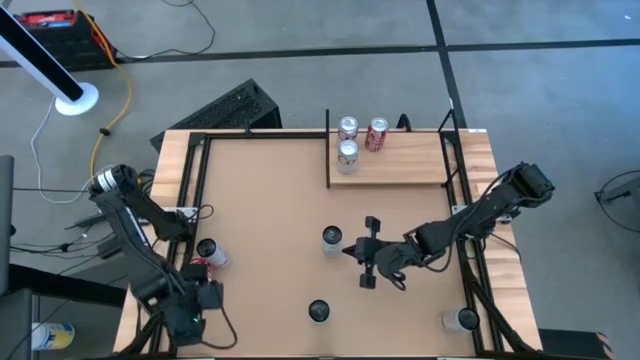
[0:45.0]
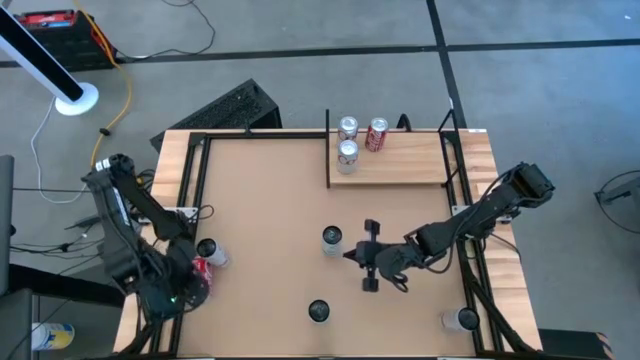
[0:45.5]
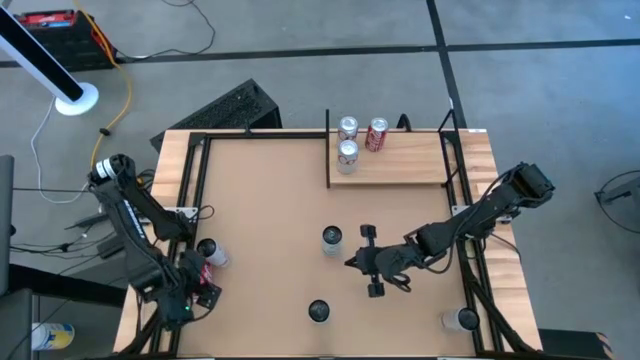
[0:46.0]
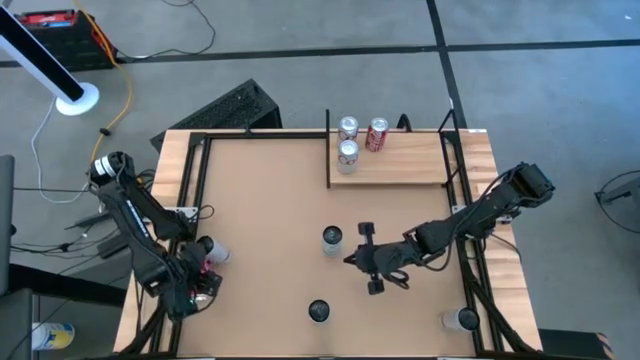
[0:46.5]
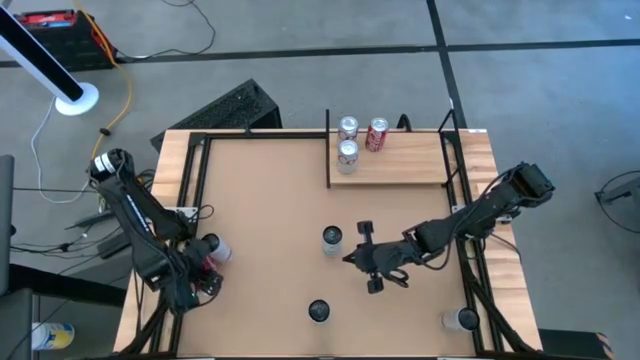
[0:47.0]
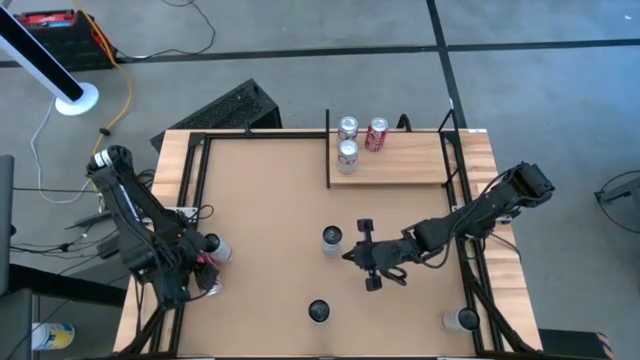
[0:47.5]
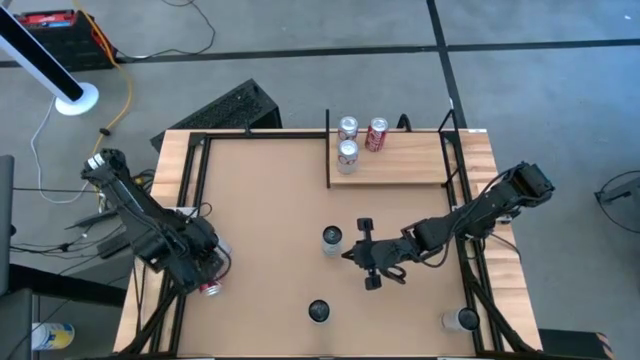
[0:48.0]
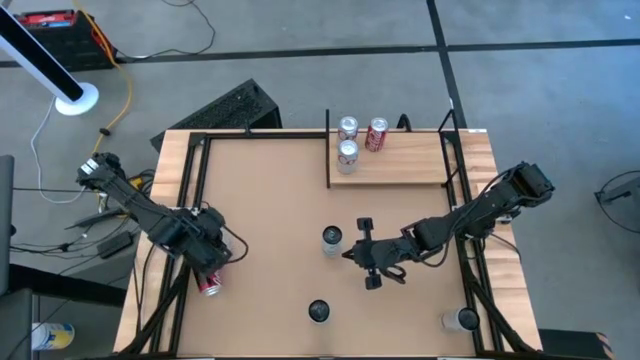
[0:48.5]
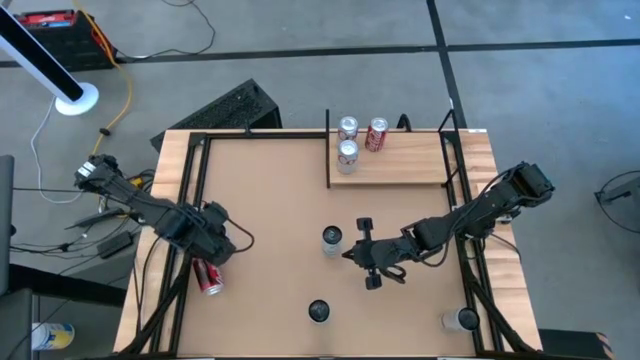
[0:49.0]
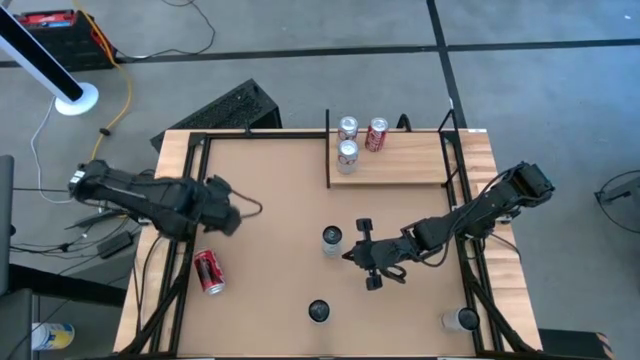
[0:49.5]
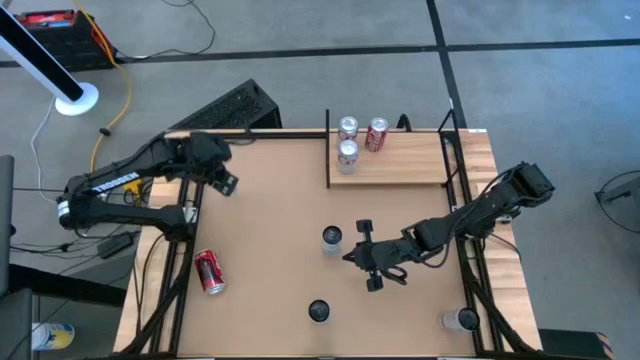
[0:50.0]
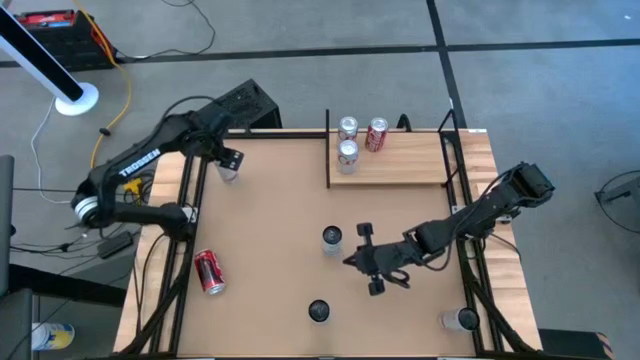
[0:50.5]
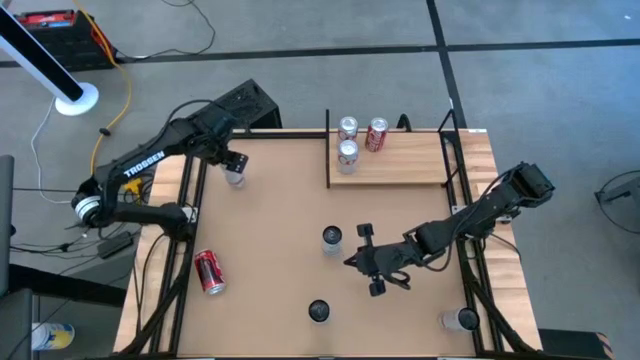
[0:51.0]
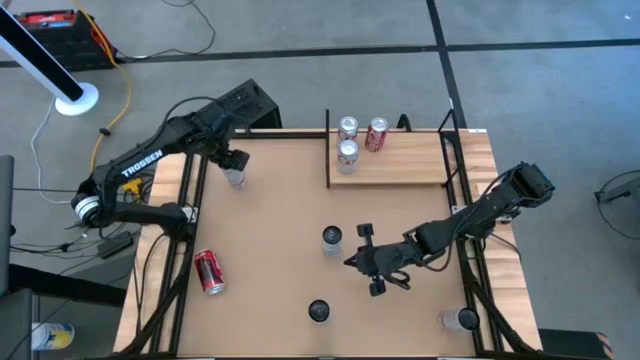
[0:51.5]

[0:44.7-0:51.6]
Task: Place canned beverage on shelf
Move the white-pink soda can to the top left of the table

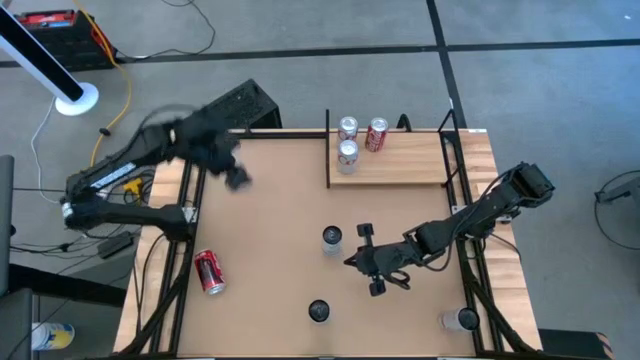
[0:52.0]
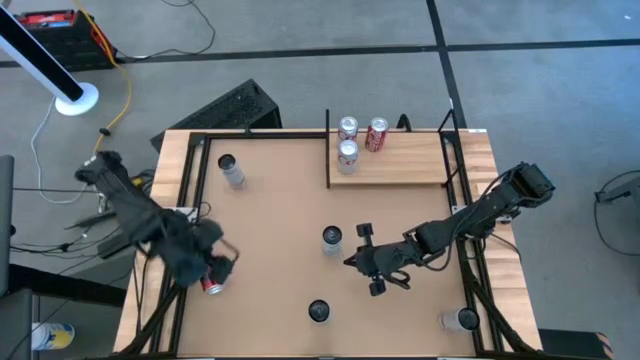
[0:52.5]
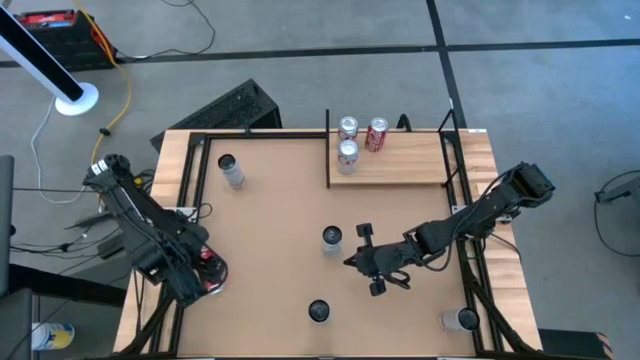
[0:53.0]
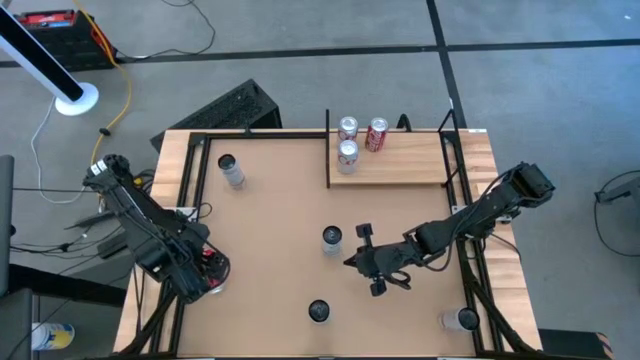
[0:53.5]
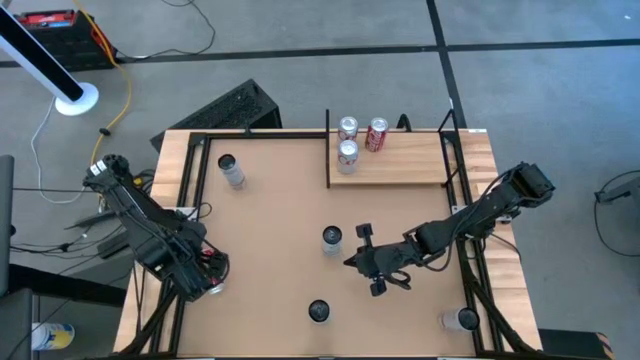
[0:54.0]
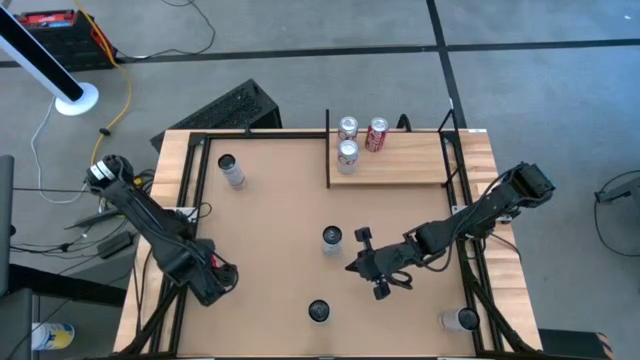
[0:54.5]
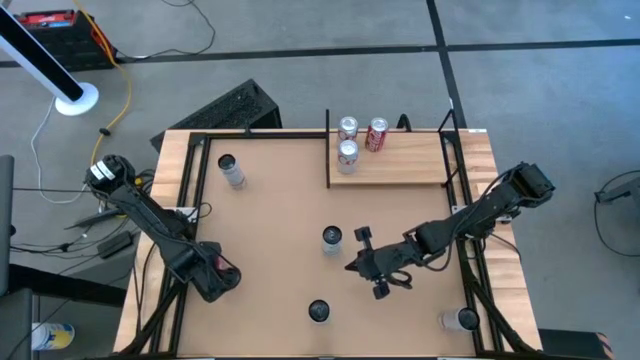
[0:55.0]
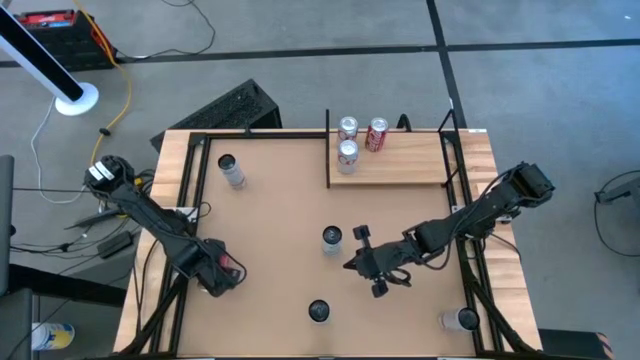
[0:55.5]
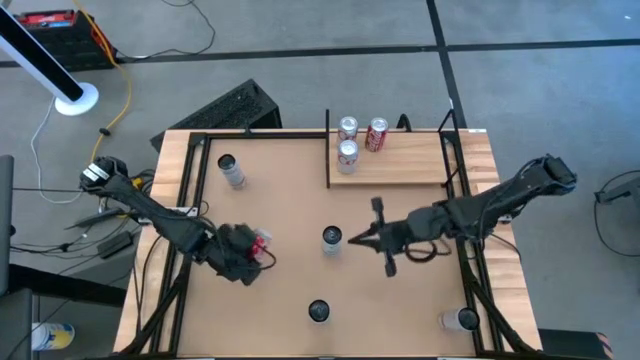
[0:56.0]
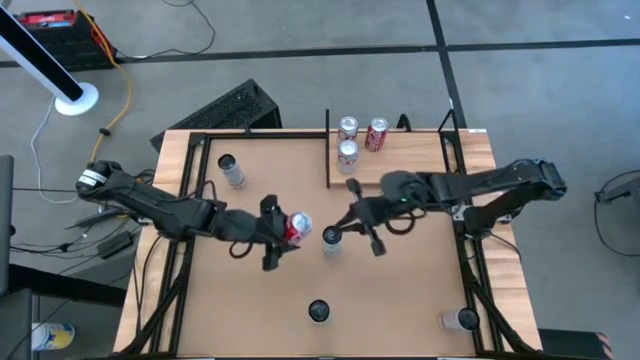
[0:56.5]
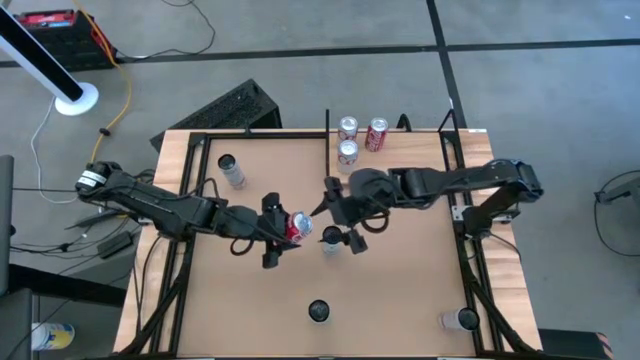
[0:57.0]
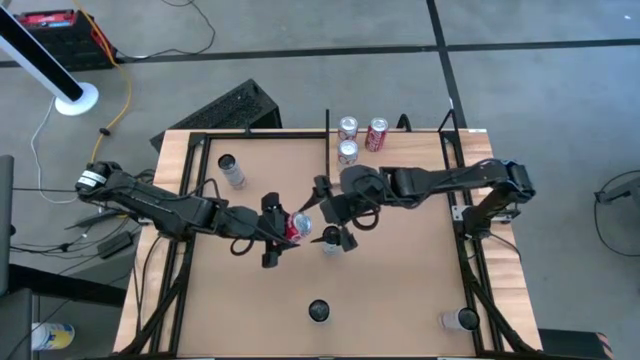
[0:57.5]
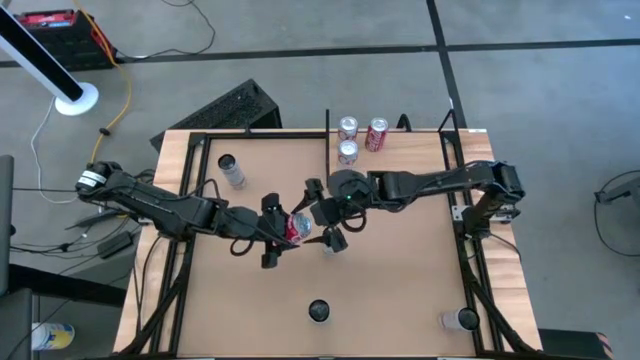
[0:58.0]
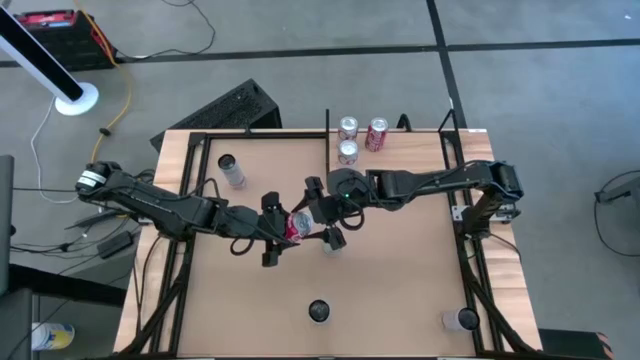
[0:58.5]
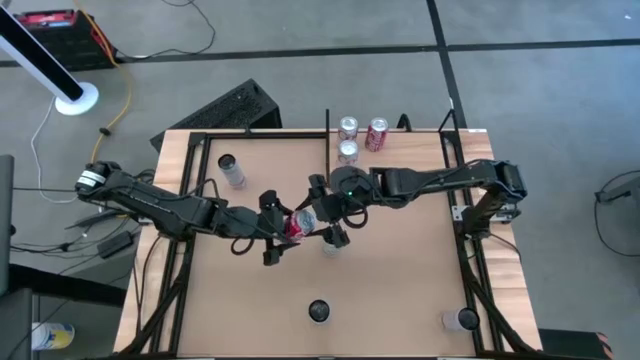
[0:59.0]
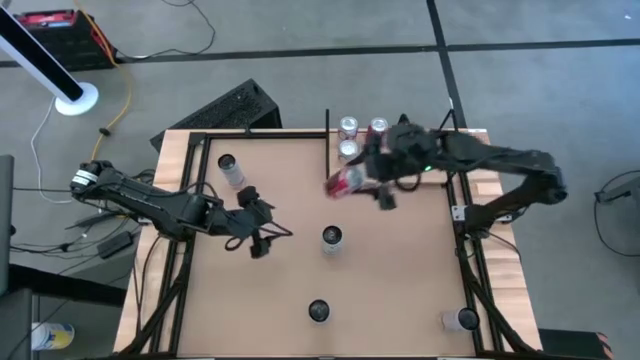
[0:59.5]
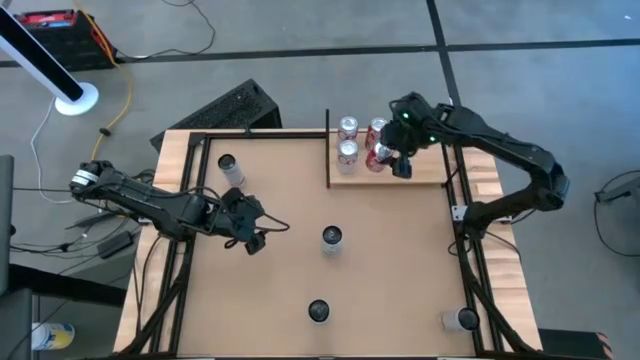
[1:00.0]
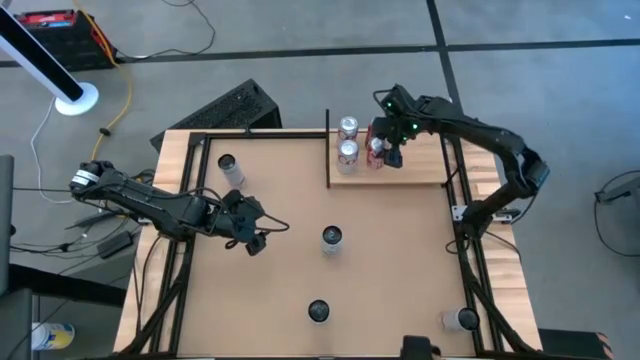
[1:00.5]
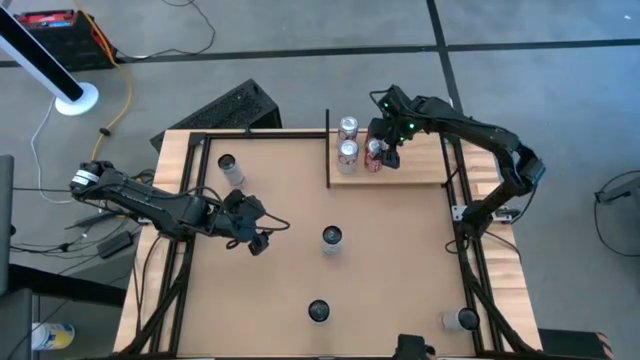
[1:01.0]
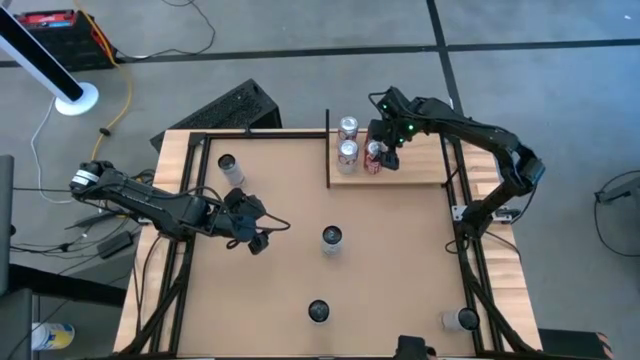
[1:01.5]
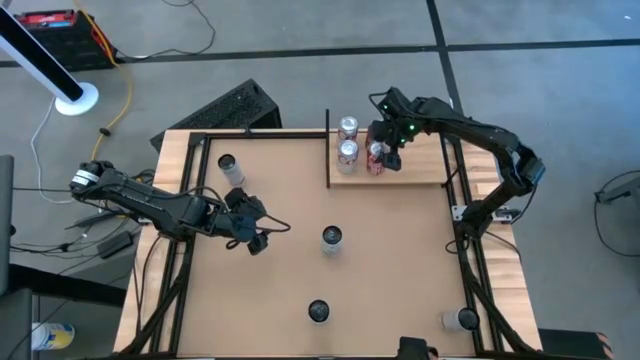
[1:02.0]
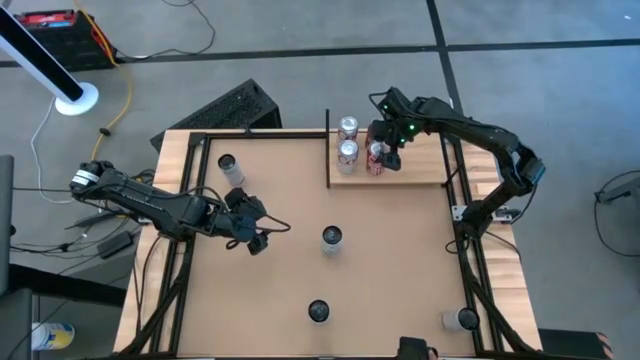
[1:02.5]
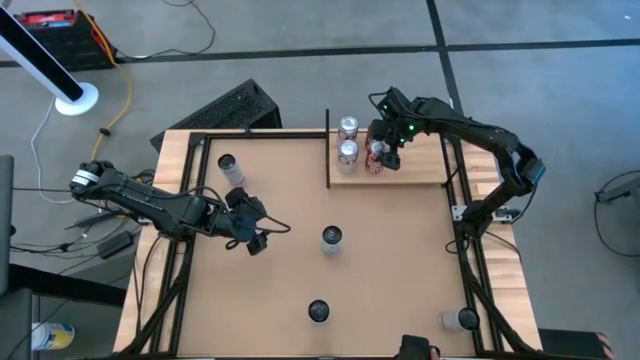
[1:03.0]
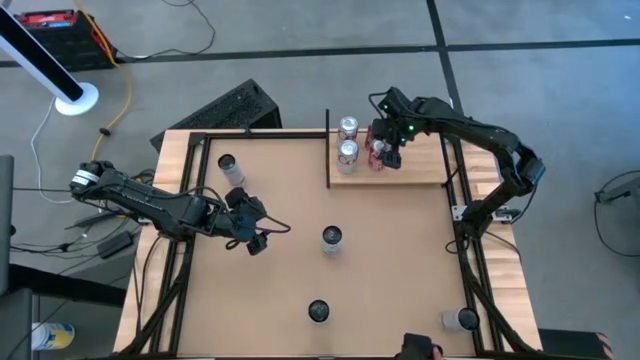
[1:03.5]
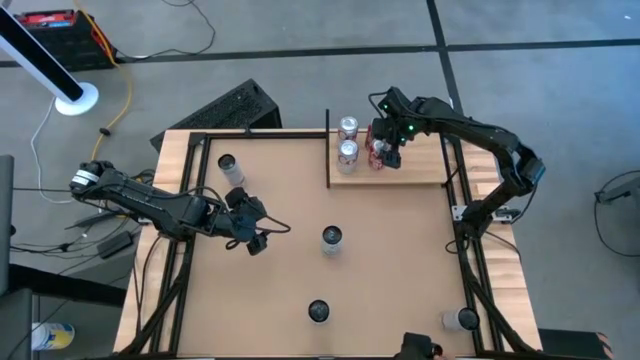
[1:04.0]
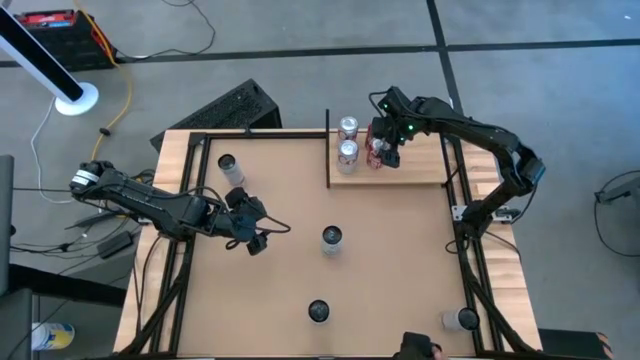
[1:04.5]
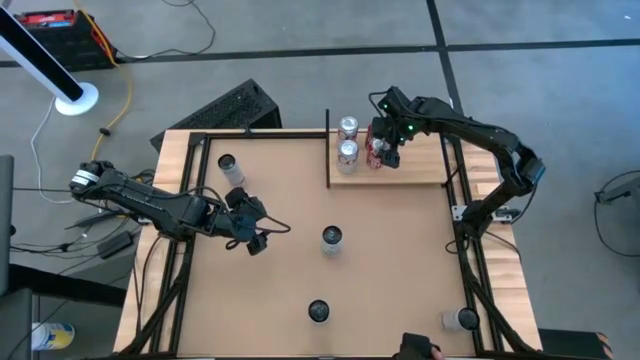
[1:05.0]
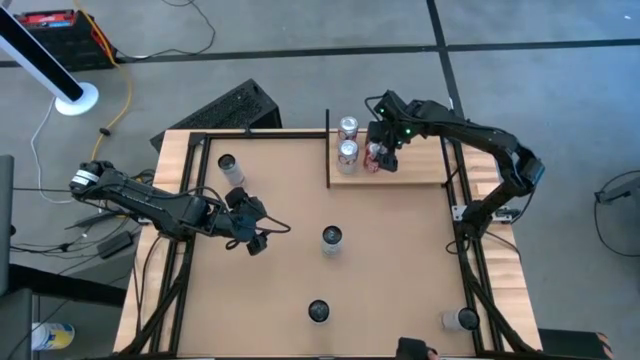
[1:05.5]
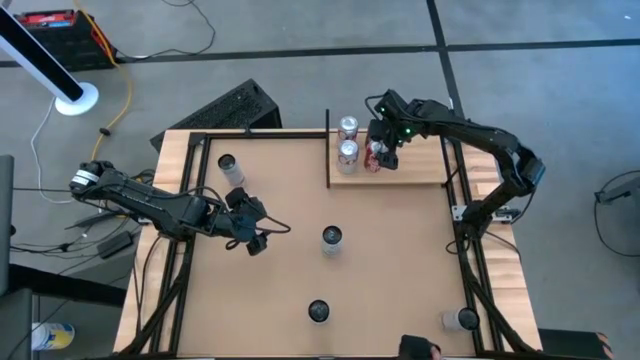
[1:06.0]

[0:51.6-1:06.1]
Put the red-white soda can on the shelf aligned with the other red-white soda can
